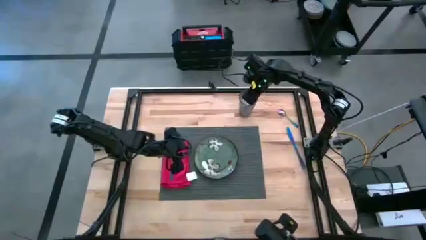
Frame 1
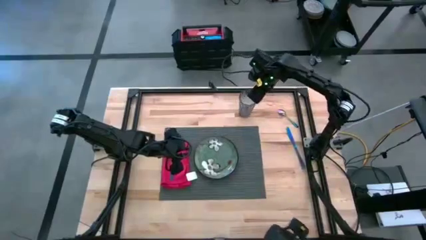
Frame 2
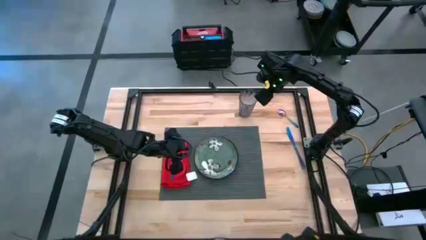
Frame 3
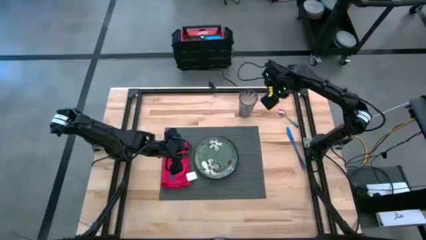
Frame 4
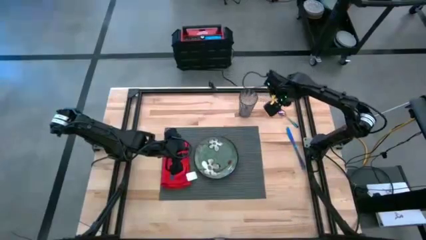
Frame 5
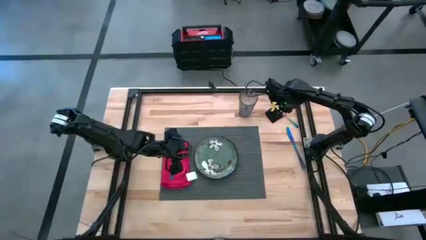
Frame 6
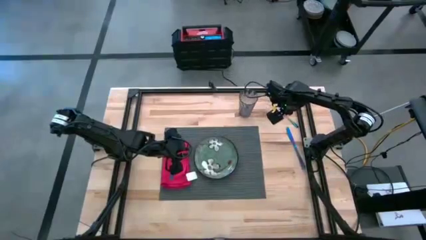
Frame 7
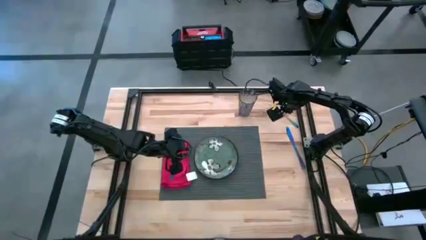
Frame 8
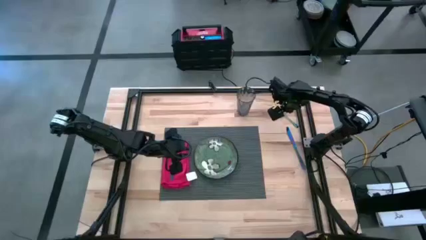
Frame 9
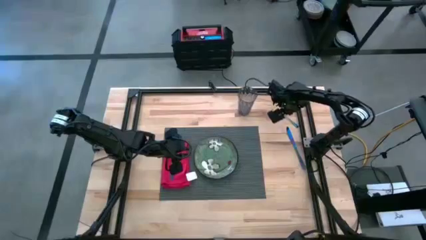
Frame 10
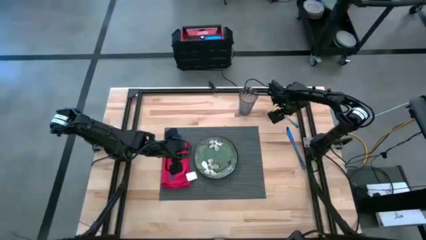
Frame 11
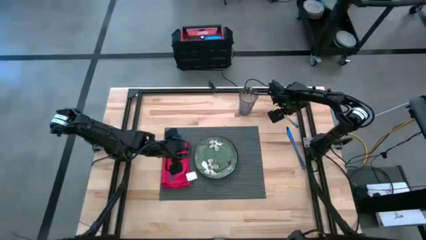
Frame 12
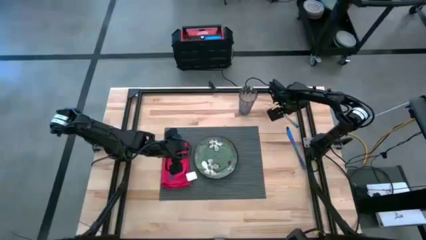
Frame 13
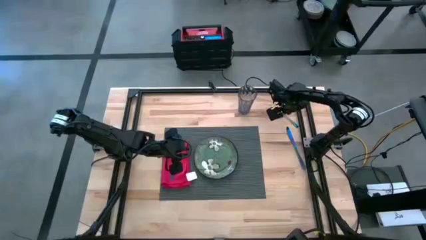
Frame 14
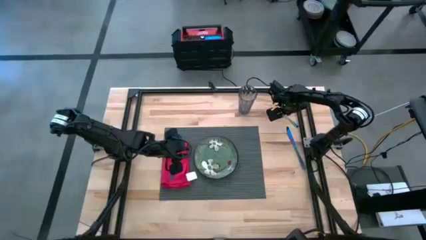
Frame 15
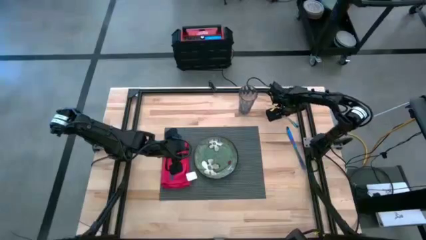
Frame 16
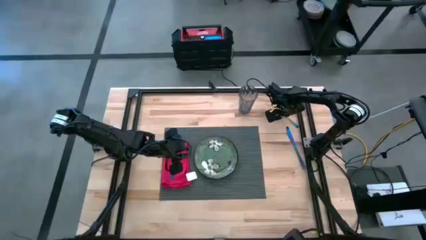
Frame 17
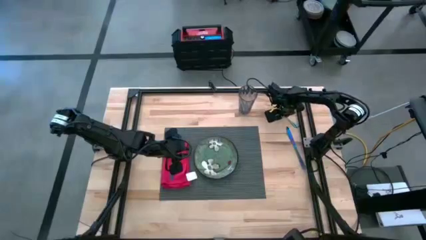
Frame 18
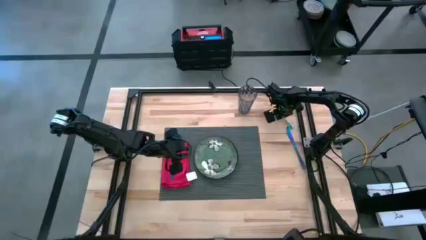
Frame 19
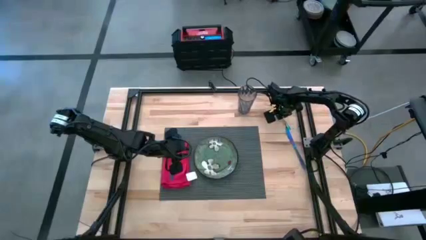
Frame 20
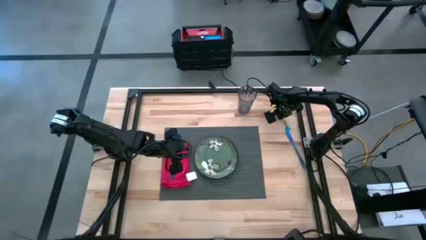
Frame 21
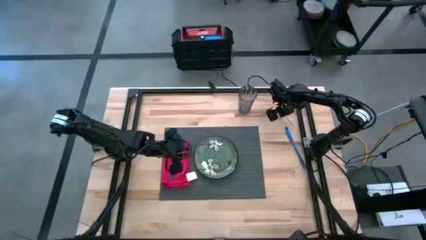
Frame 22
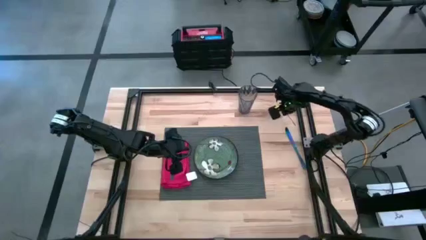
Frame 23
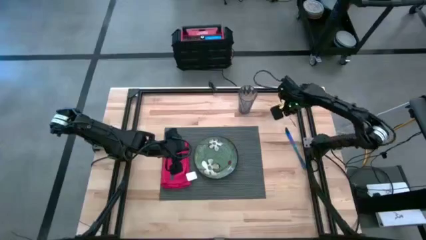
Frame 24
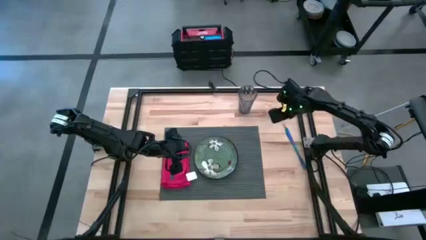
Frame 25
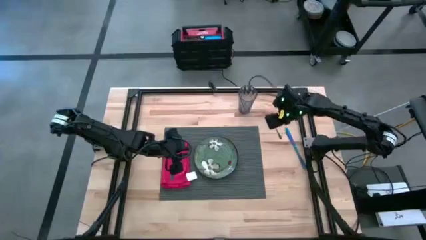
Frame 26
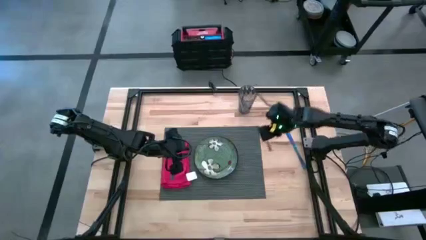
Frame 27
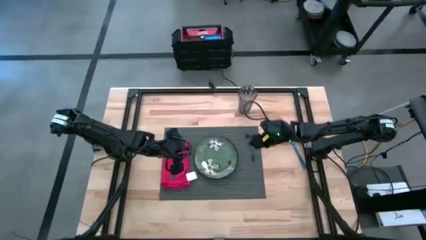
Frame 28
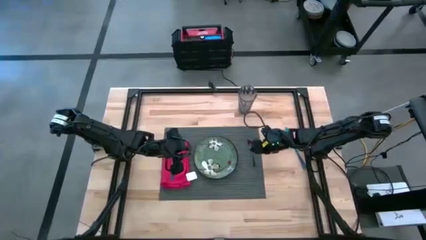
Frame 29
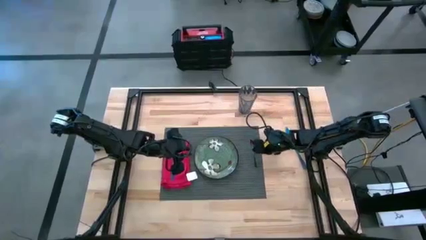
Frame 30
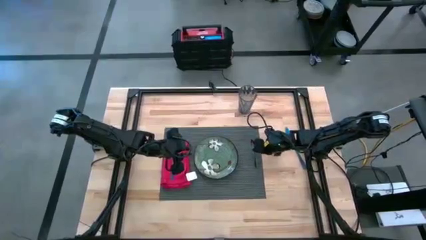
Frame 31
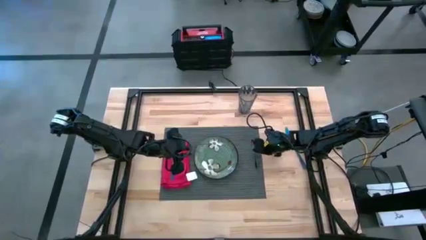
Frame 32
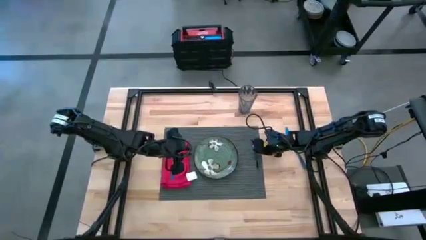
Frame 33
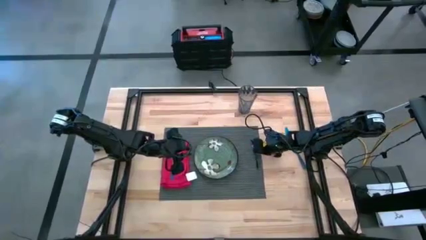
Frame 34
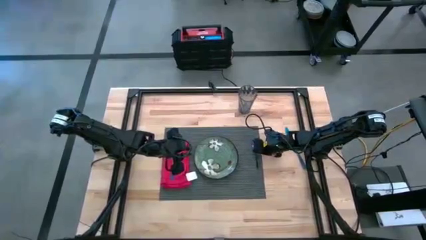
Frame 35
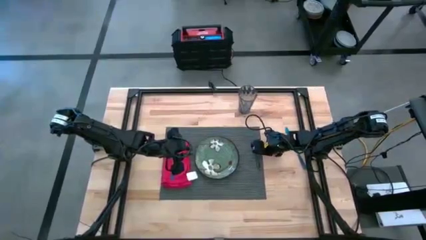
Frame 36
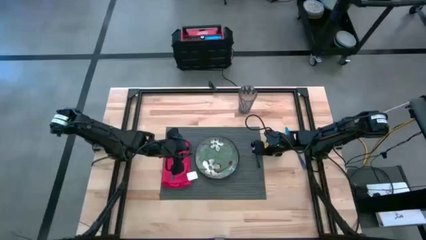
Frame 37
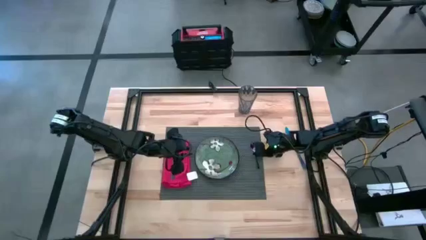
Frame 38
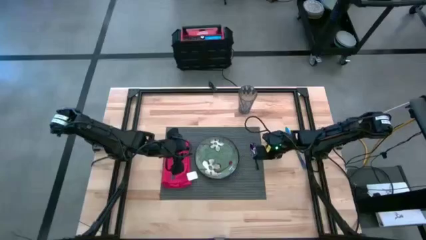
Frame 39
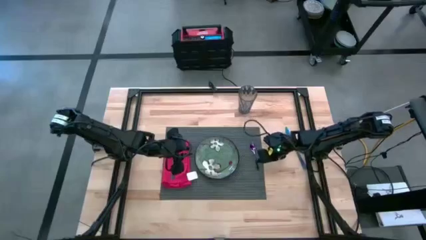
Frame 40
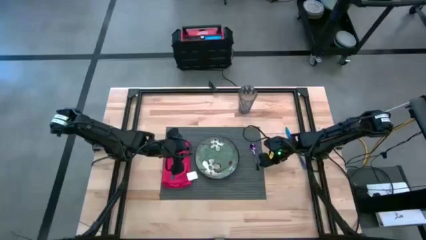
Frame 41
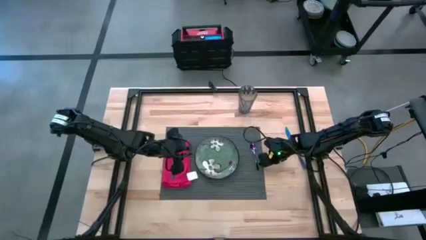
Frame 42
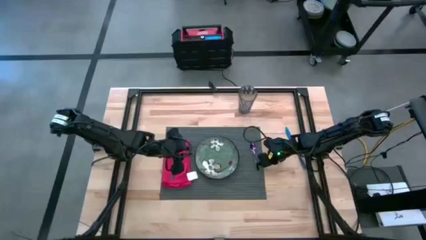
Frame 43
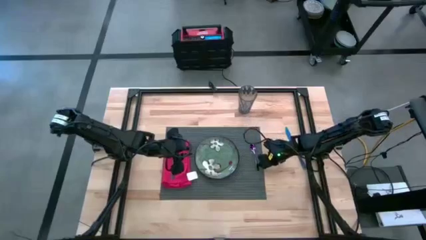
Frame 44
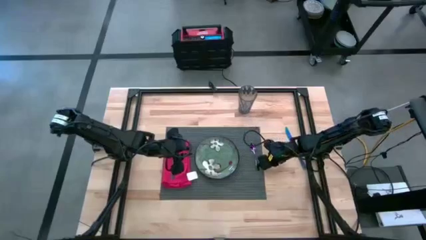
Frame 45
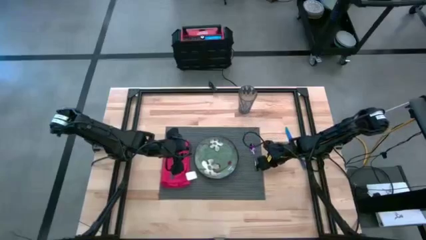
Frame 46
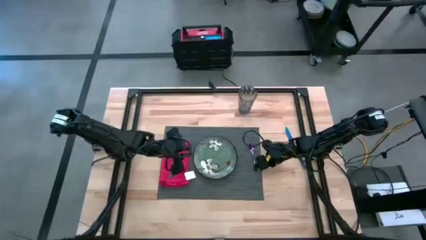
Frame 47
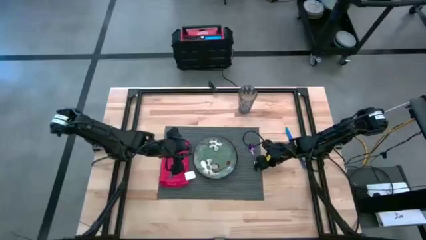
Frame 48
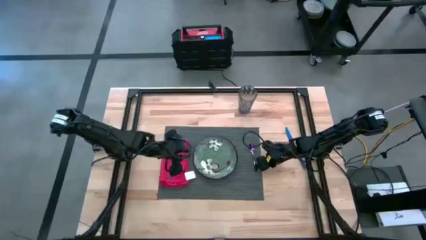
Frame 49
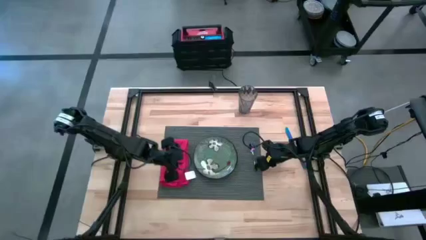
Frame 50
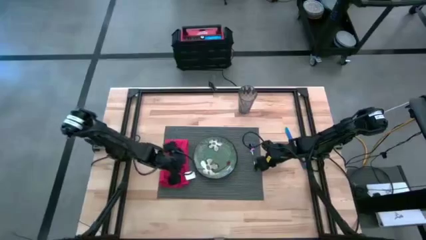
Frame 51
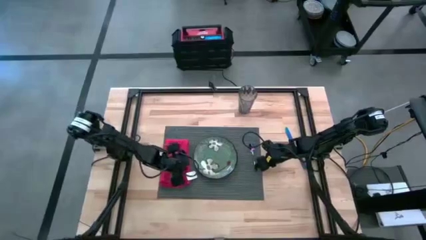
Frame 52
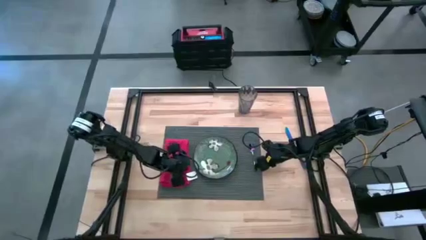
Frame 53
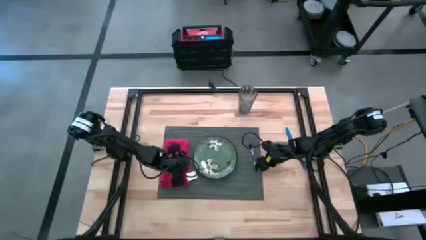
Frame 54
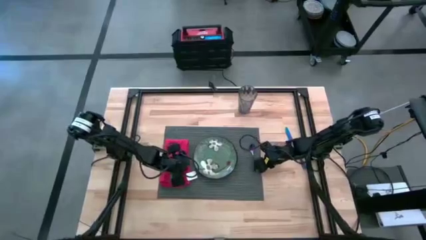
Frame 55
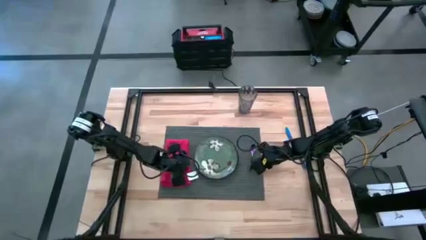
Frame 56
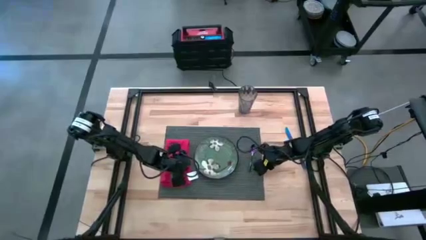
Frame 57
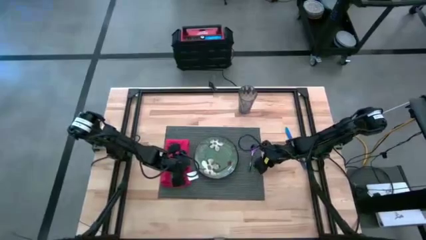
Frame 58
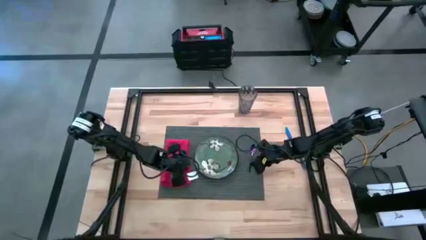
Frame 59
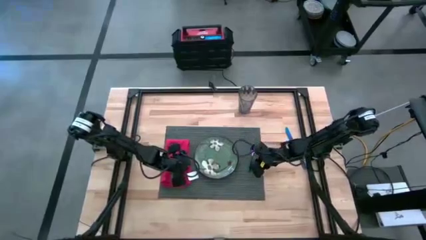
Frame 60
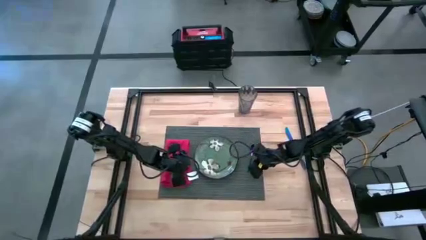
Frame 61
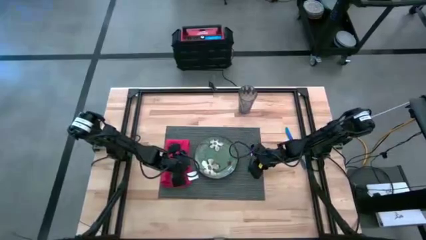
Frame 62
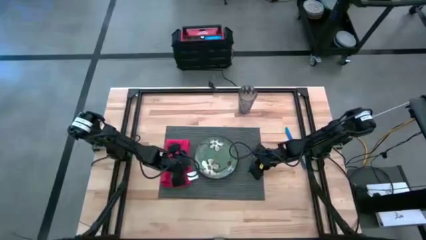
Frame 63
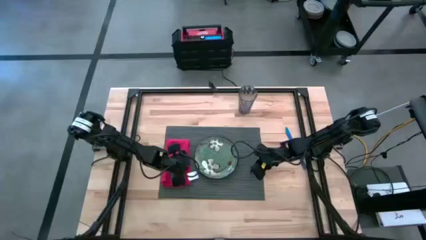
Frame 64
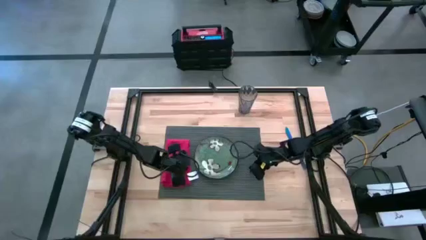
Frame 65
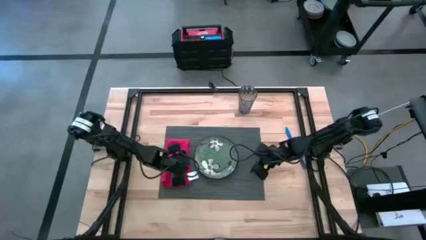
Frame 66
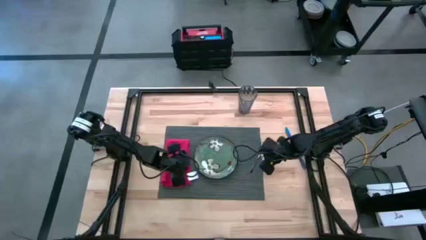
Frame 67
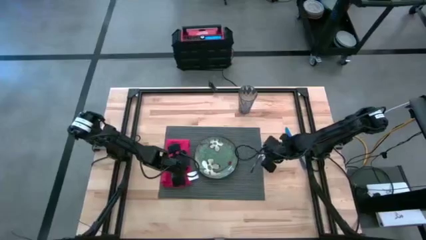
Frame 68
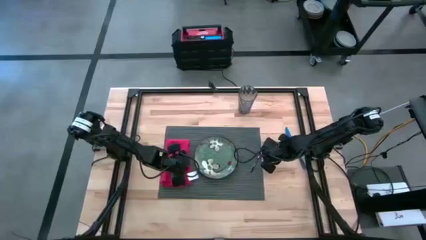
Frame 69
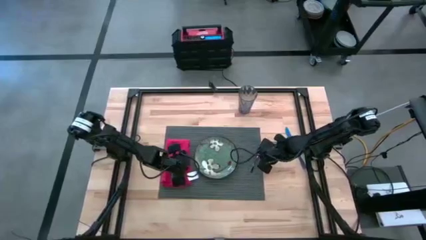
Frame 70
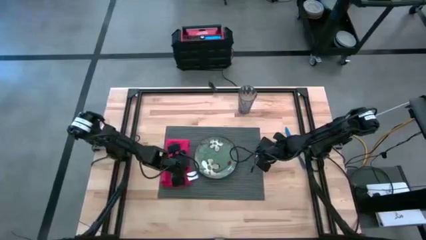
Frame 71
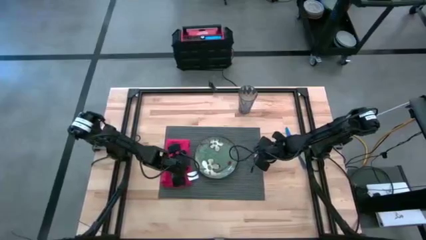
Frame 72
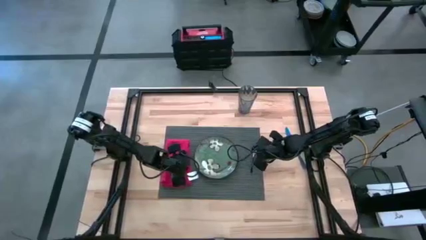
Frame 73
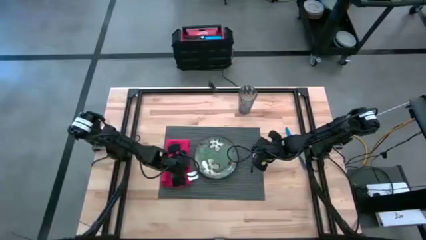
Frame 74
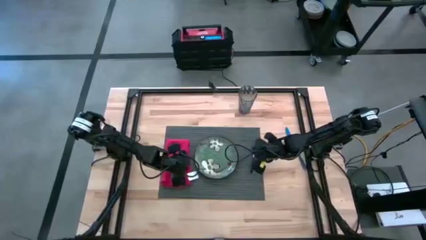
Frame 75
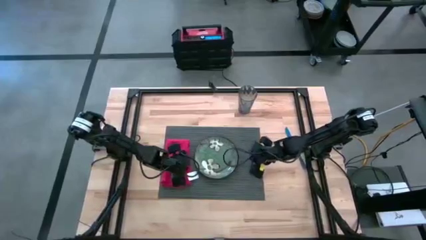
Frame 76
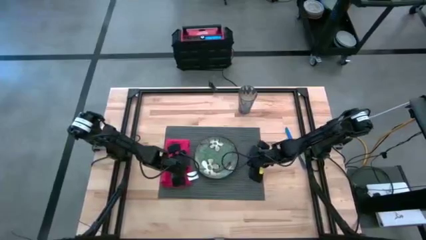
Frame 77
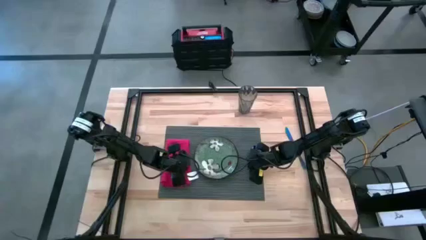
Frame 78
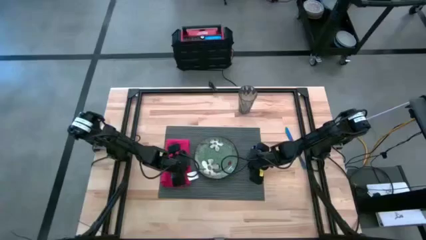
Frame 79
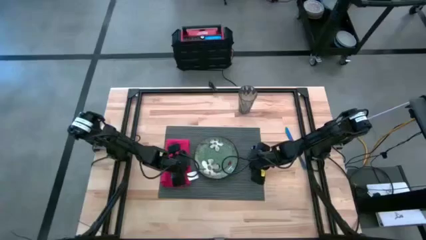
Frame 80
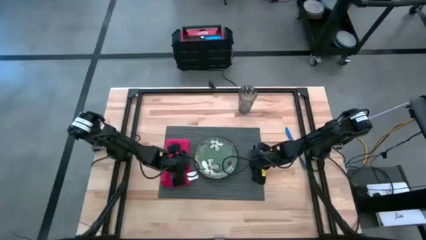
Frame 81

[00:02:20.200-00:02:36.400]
Task: Set table place
Put the blue spoon on the gray table mat to the right of the green plate

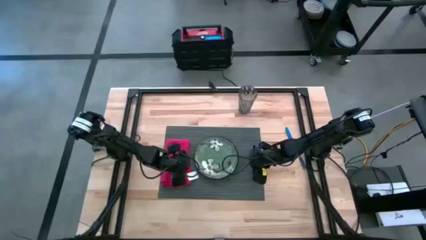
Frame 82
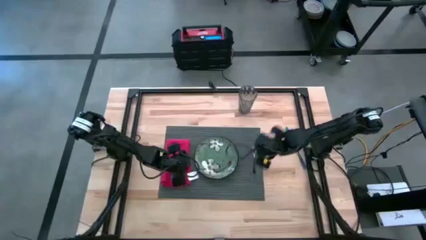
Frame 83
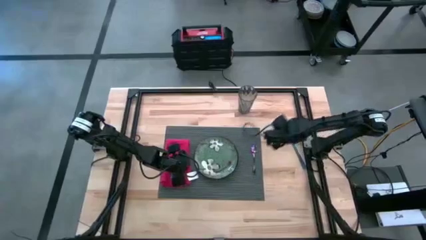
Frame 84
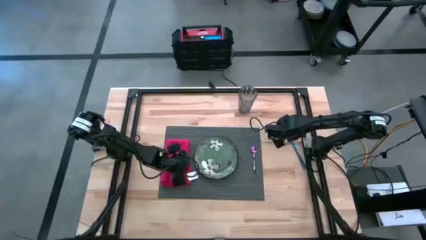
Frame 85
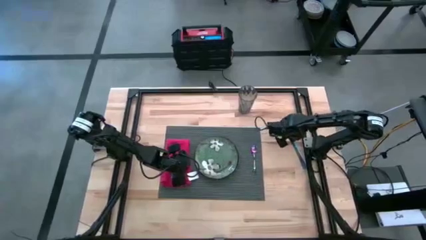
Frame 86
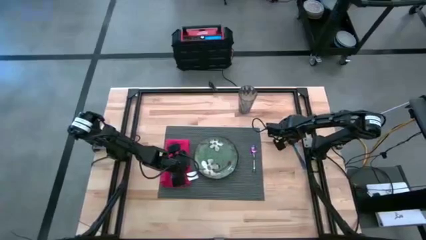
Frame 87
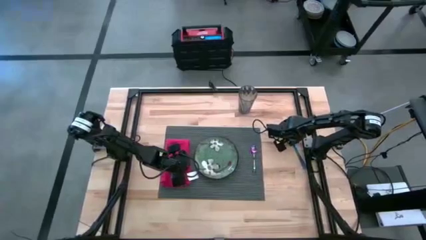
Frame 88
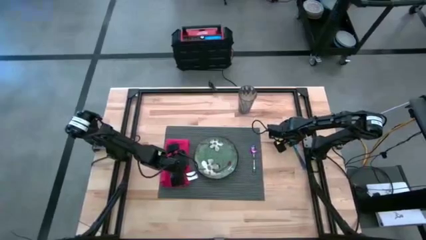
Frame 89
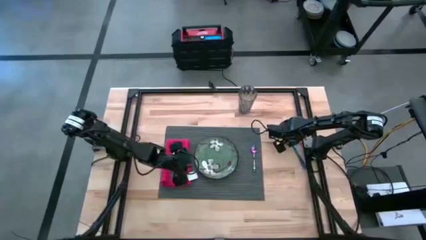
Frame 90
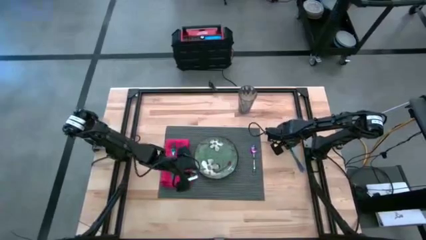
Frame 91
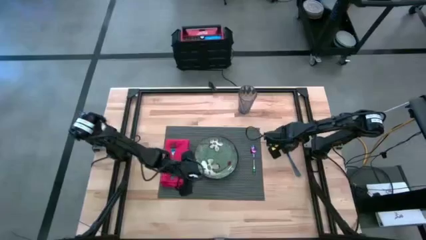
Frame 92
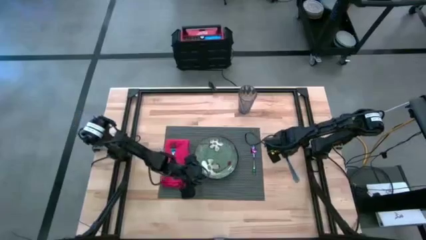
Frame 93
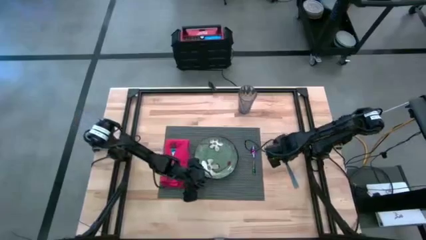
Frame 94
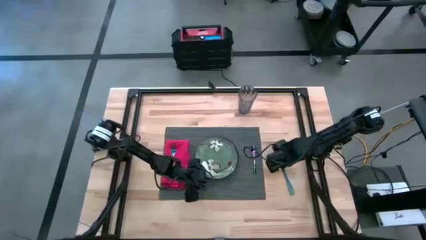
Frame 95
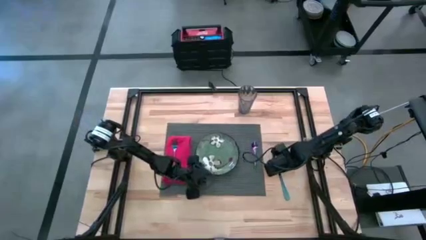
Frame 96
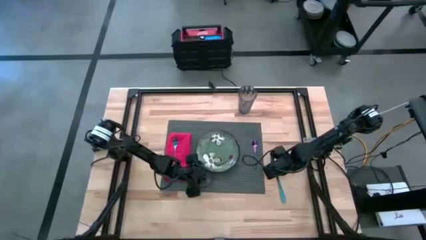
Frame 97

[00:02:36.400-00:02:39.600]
Move the blue table knife to the right of the gray table mat
